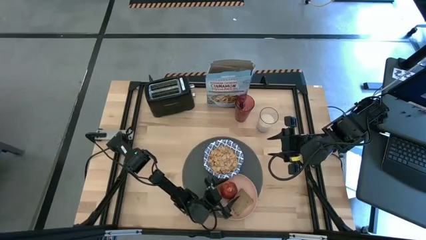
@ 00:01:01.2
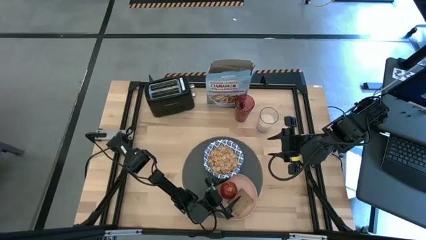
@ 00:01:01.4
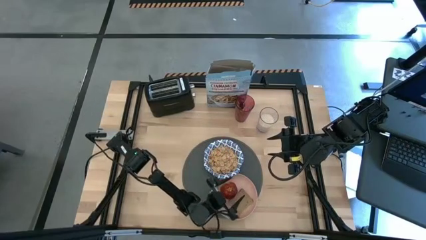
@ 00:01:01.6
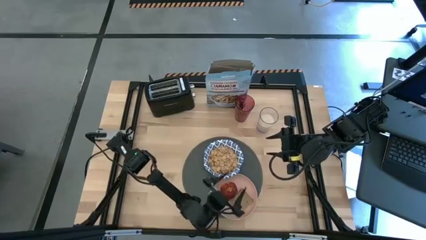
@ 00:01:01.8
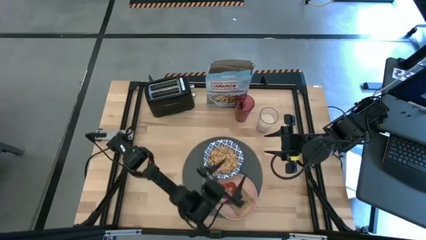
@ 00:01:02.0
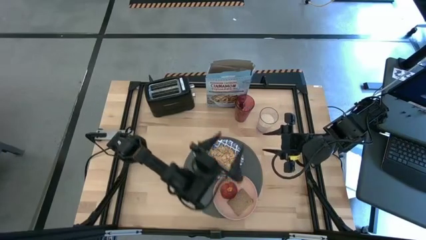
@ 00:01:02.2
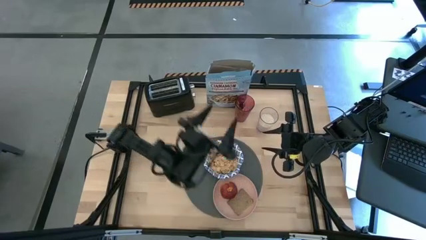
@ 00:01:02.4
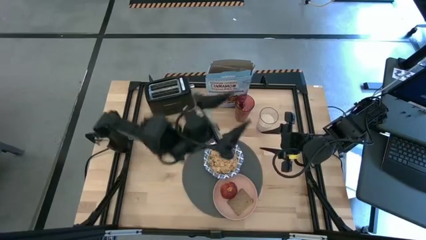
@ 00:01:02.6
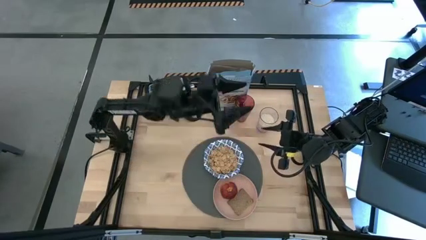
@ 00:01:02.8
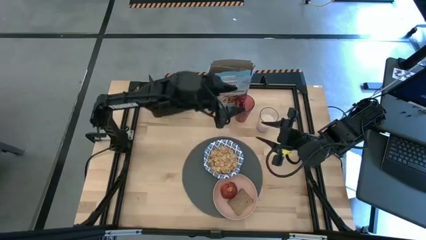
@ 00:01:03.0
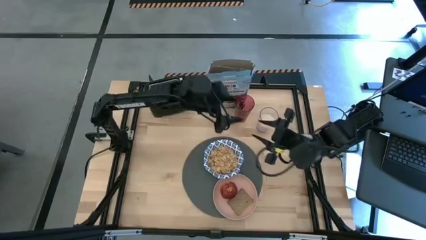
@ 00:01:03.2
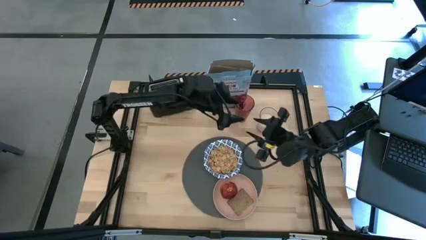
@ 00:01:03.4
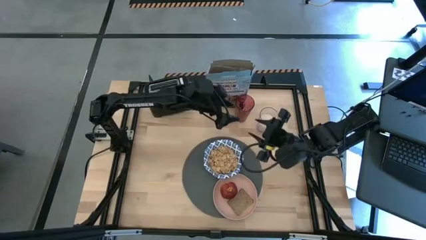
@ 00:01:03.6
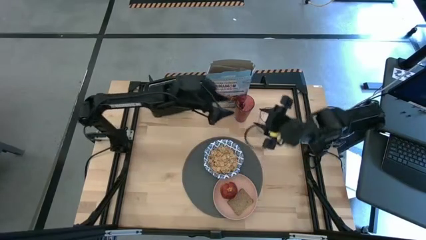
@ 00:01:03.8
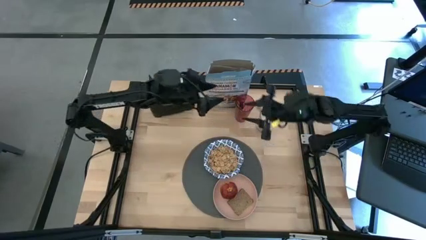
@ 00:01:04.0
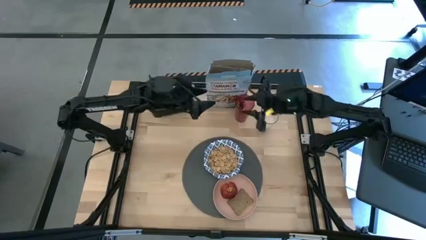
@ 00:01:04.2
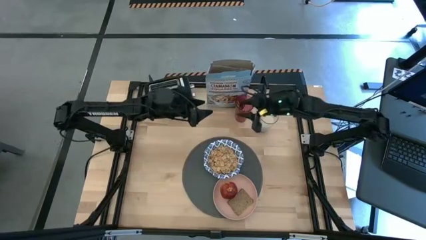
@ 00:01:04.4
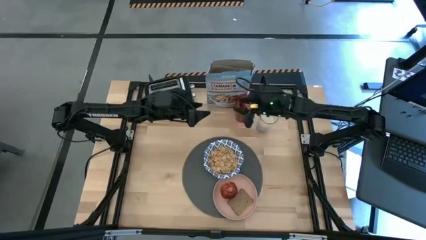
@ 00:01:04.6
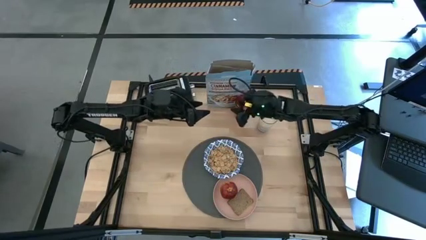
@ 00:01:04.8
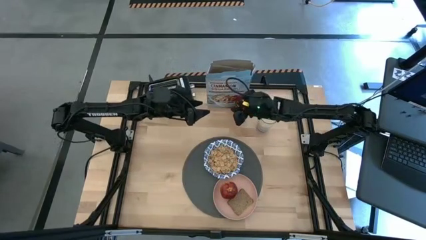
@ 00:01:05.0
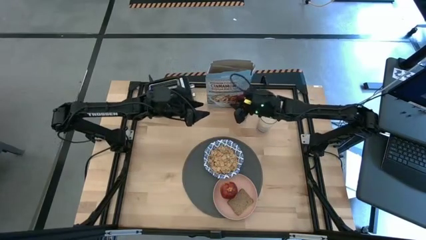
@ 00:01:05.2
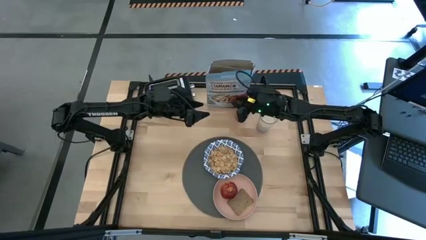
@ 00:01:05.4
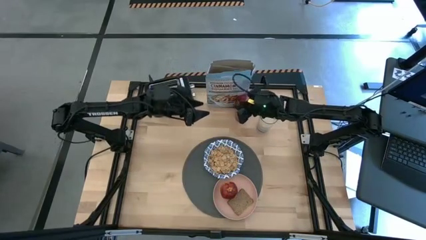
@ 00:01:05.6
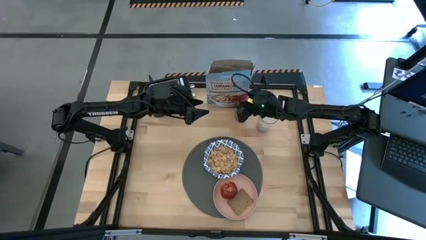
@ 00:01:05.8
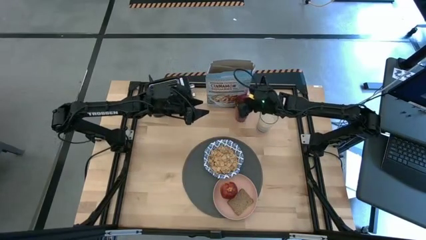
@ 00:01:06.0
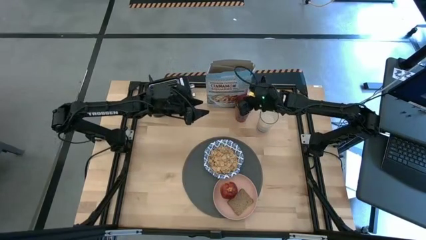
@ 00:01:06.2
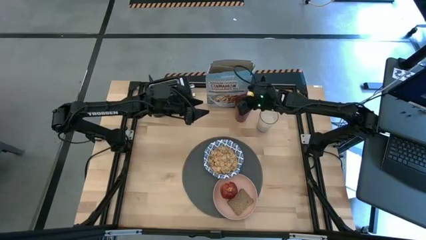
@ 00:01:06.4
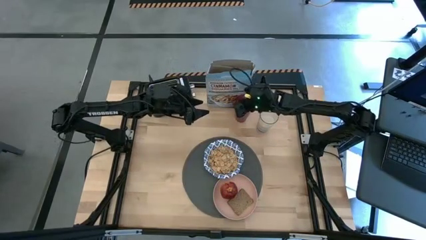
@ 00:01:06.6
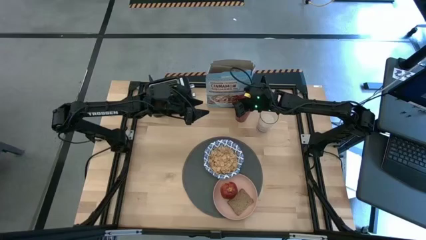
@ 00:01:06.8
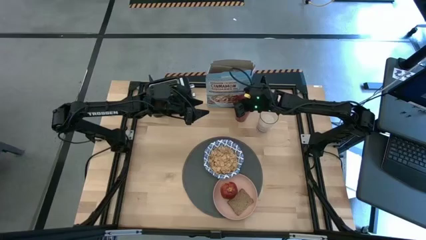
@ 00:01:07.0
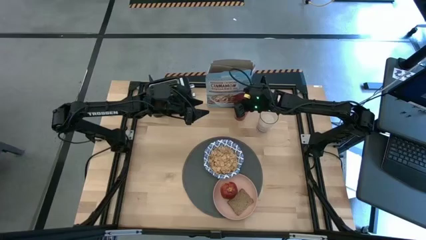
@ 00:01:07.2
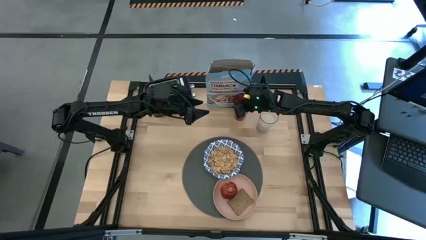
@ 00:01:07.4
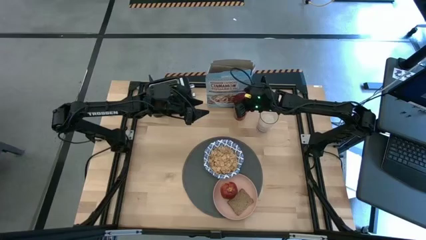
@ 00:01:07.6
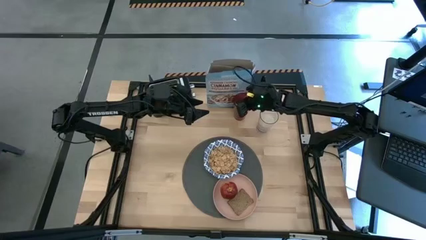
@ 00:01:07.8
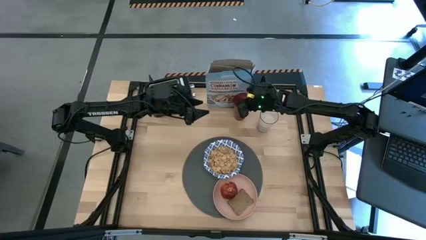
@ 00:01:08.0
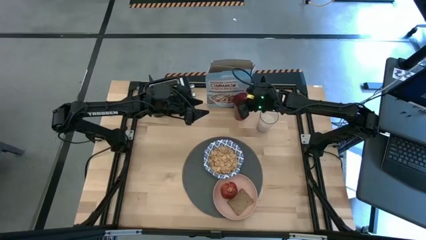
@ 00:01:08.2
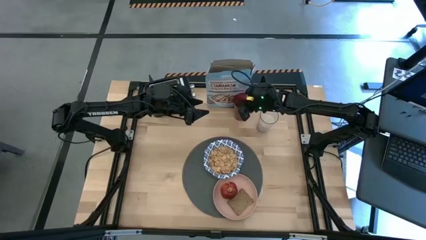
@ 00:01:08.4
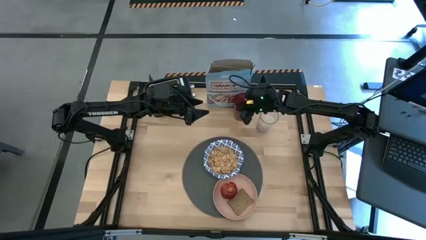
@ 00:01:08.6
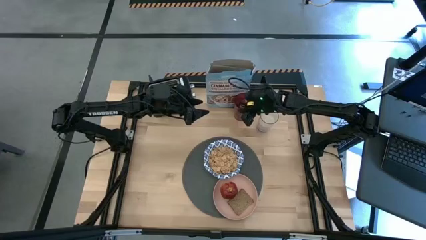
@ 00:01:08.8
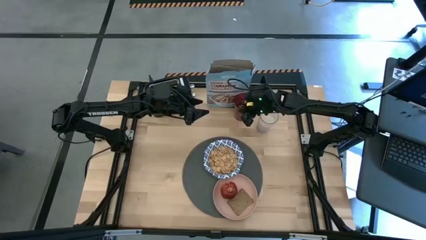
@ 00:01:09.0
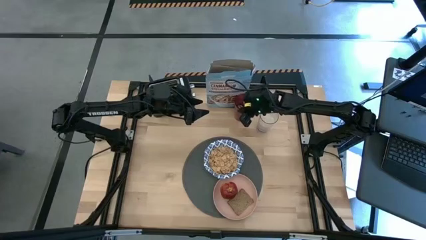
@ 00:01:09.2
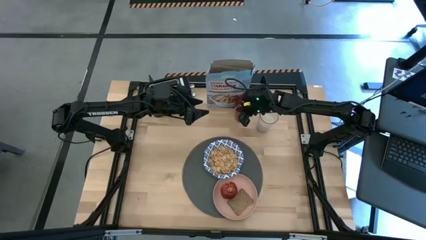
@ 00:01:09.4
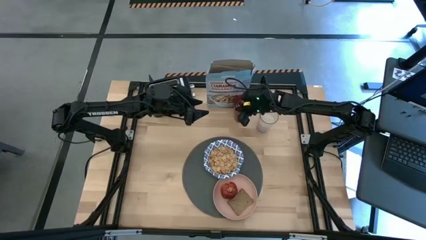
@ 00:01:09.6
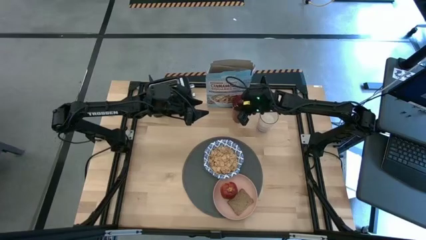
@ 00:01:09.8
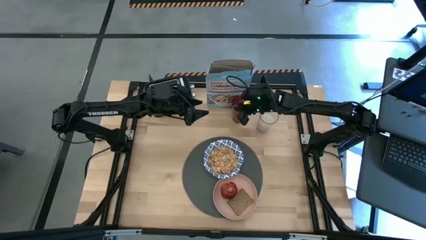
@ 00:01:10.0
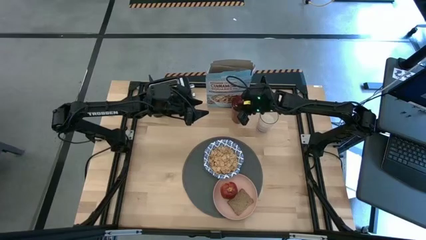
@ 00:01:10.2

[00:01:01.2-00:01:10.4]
Task: Arrange a breakfast setting
Put the spoon on the gray placemat

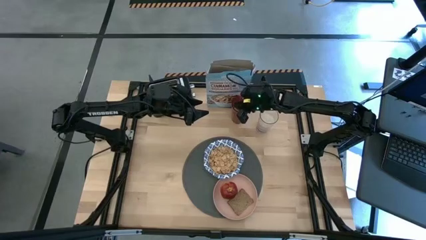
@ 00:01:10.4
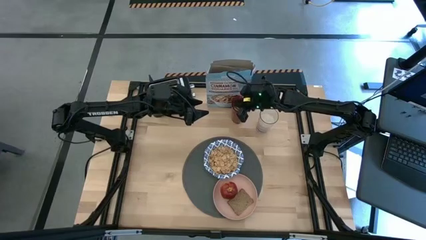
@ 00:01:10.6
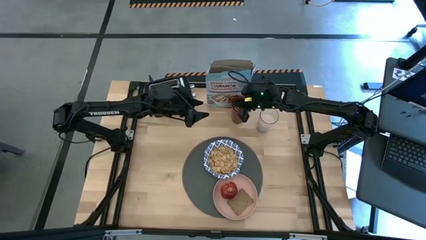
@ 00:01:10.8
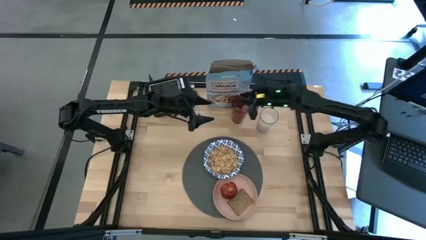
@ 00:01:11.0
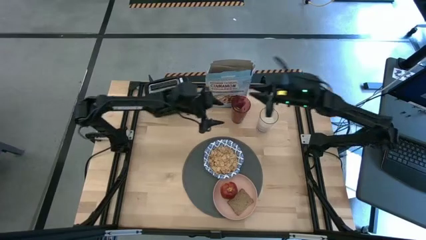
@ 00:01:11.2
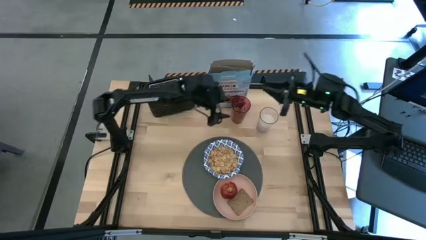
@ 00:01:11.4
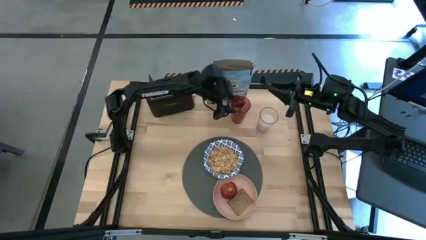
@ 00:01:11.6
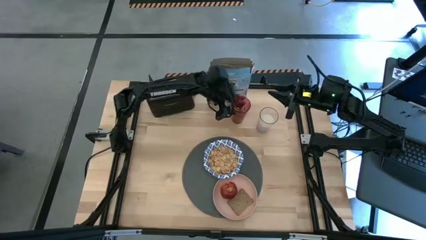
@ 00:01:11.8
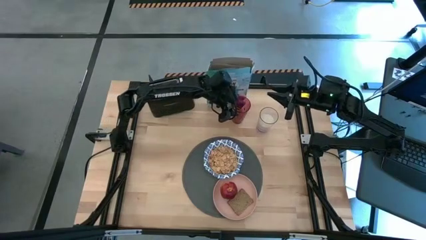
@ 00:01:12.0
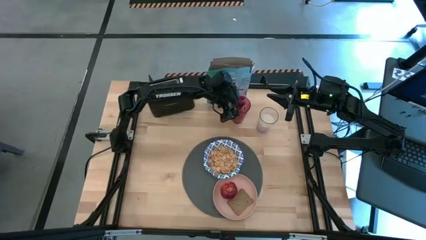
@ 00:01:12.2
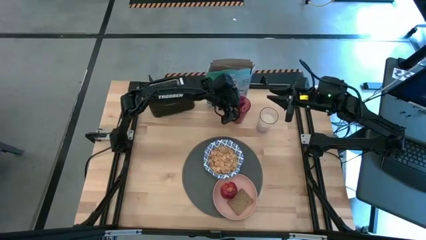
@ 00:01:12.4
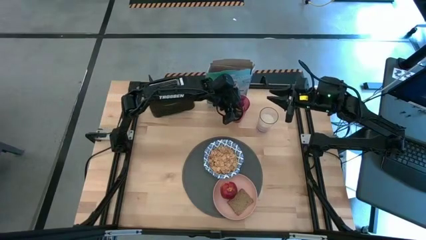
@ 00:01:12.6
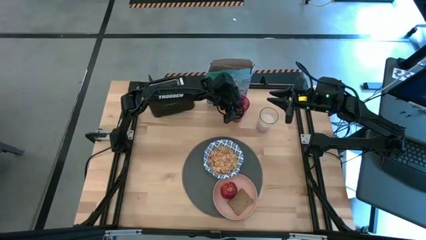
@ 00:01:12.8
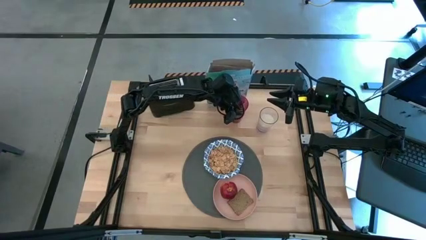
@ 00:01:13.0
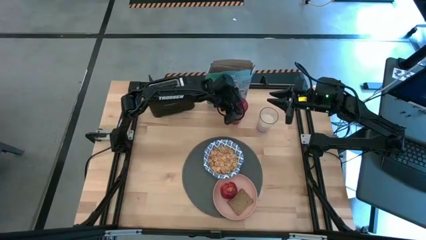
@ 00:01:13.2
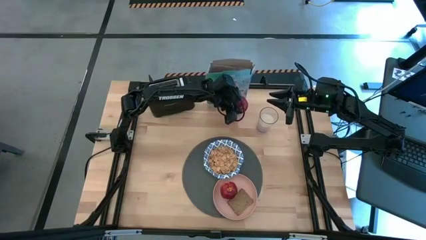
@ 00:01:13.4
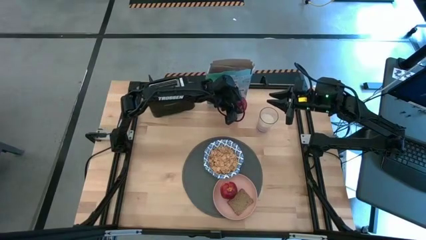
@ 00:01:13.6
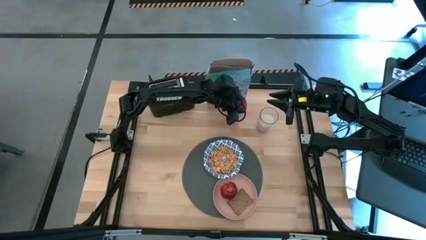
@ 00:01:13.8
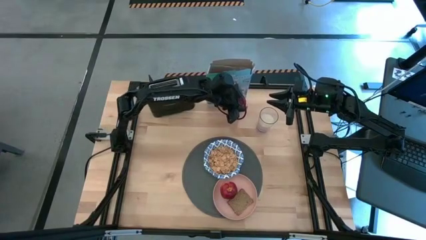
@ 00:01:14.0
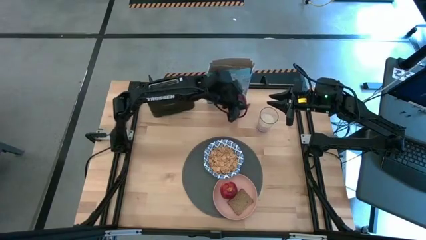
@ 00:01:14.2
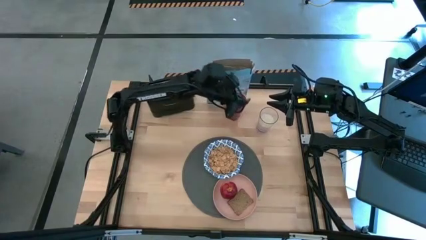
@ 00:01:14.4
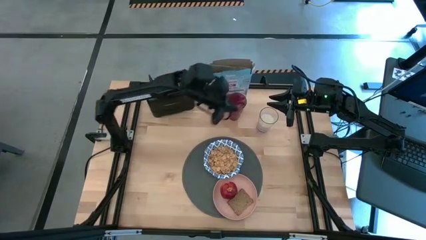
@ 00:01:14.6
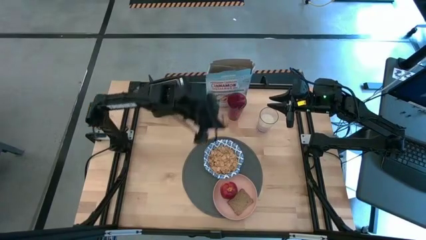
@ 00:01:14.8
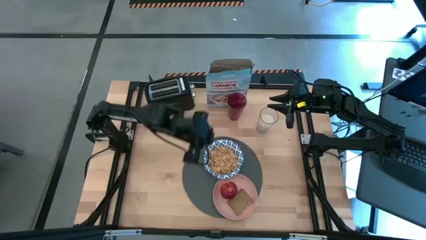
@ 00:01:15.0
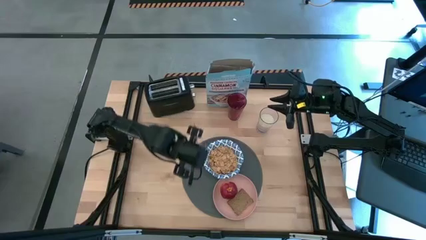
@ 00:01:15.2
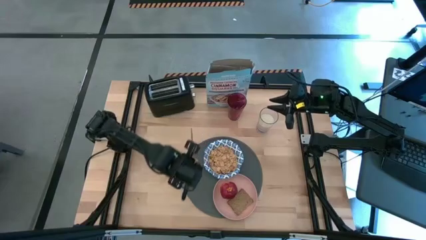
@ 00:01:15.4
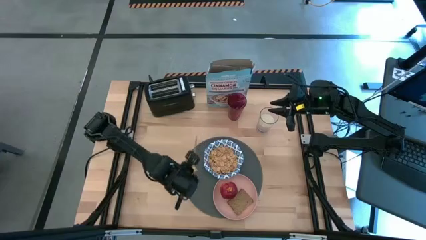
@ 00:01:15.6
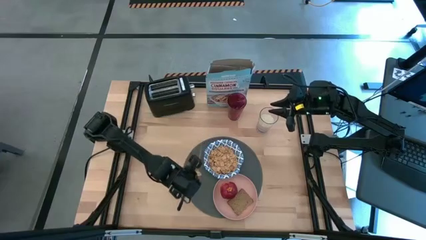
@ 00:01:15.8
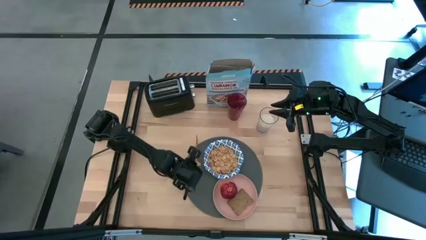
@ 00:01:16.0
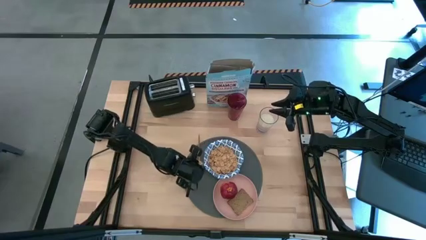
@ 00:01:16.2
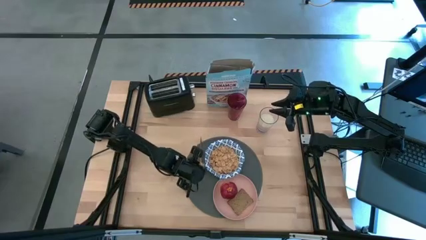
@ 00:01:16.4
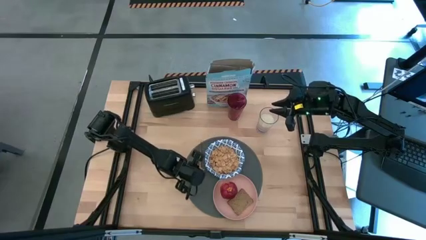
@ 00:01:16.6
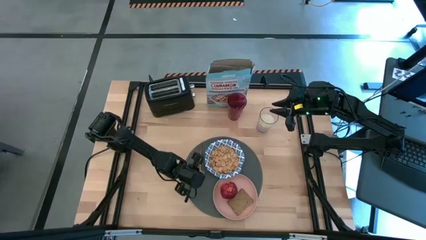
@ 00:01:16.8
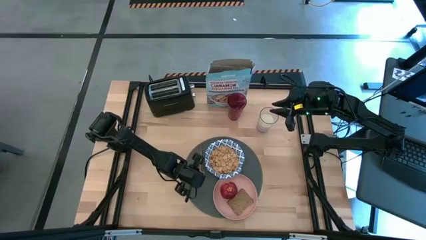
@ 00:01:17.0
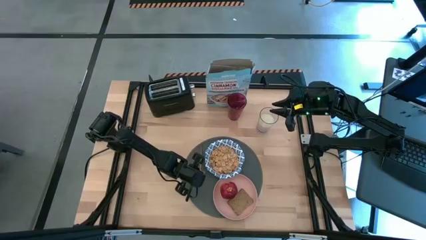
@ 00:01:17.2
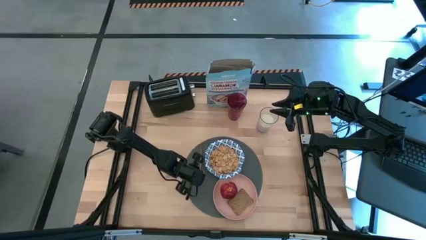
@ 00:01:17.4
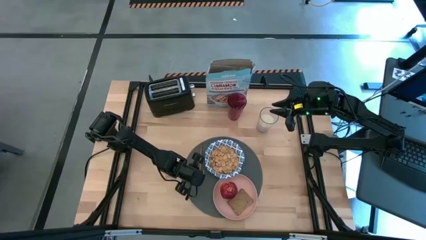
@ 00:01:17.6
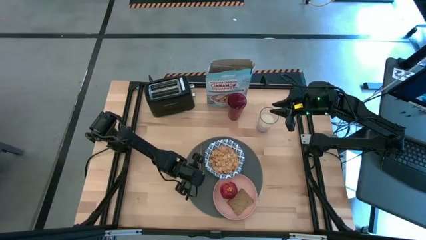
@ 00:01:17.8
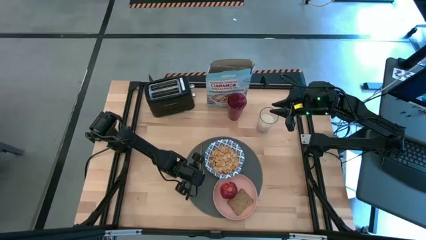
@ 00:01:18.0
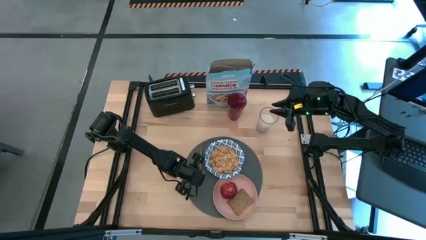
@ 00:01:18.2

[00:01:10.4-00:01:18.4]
Put the spoon on the gray placemat
